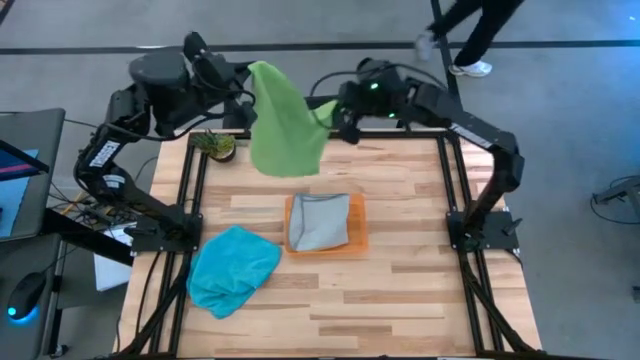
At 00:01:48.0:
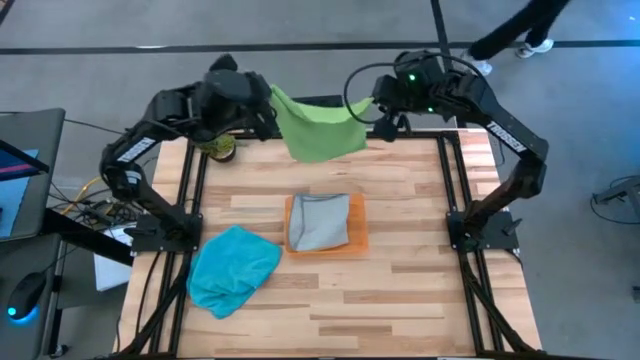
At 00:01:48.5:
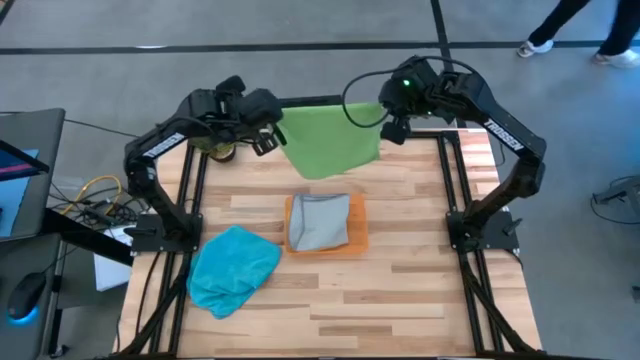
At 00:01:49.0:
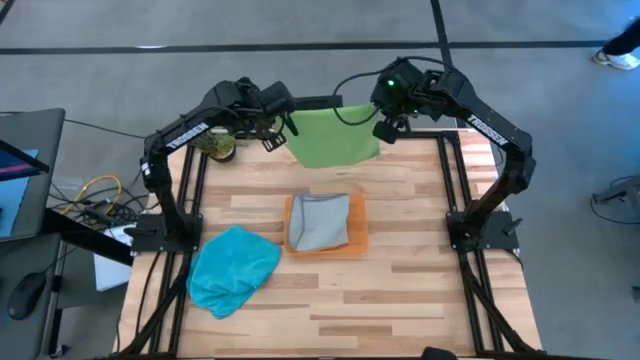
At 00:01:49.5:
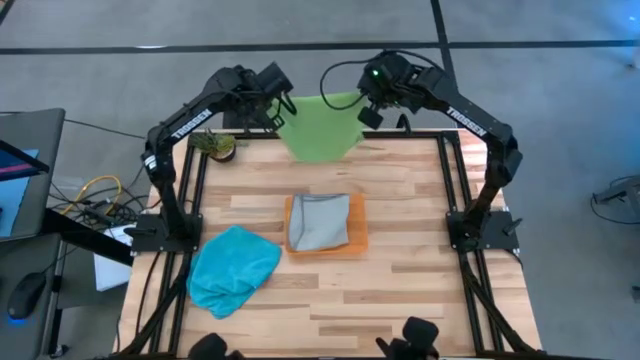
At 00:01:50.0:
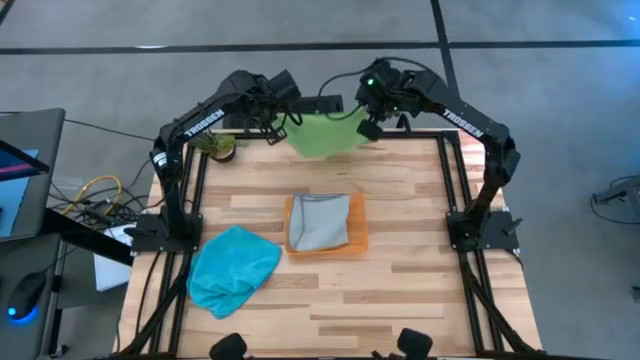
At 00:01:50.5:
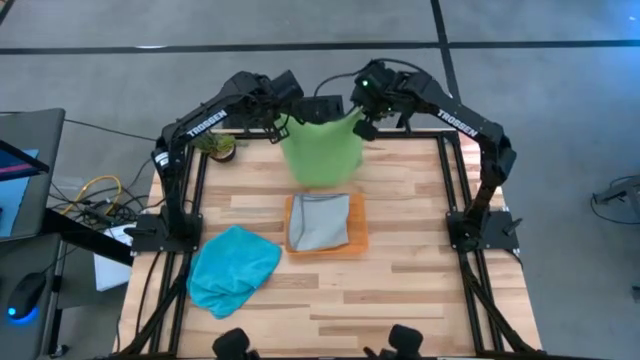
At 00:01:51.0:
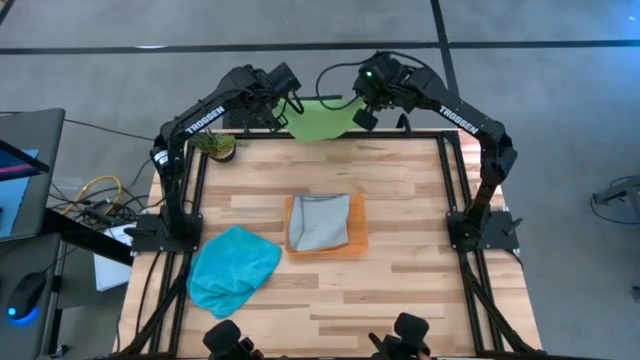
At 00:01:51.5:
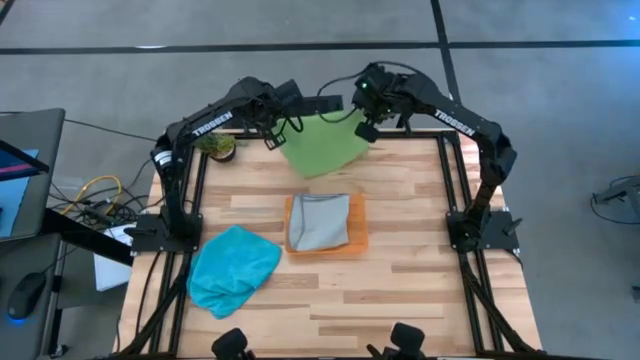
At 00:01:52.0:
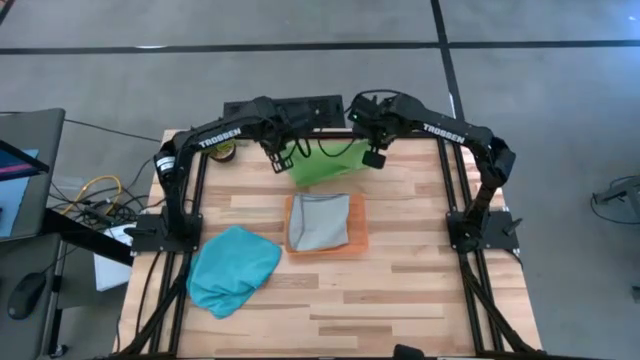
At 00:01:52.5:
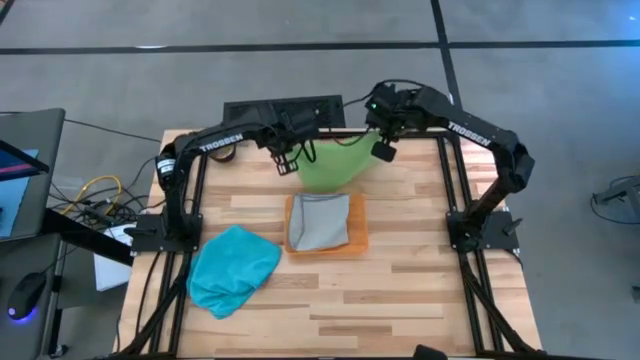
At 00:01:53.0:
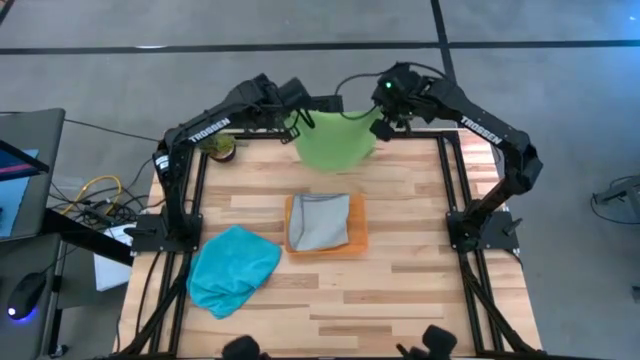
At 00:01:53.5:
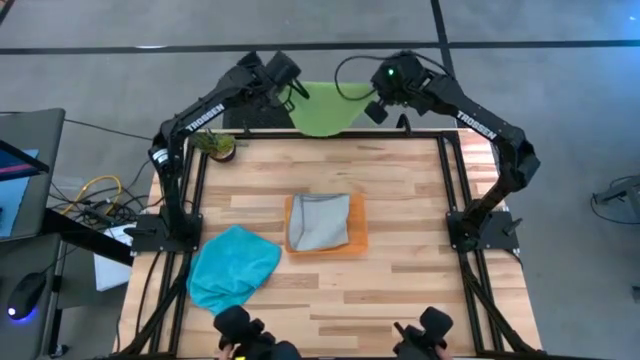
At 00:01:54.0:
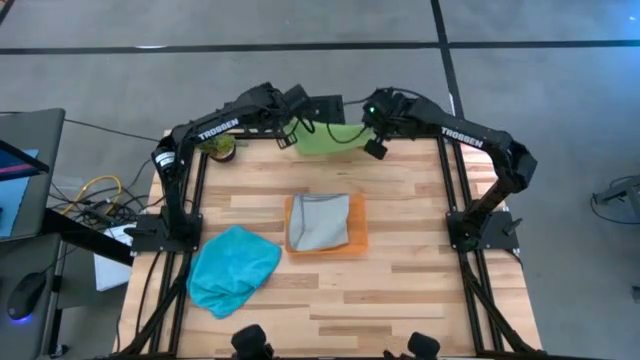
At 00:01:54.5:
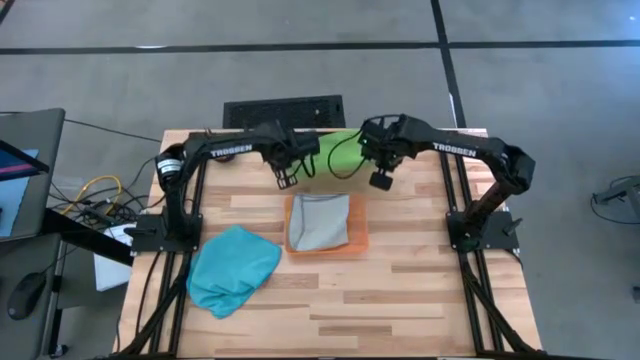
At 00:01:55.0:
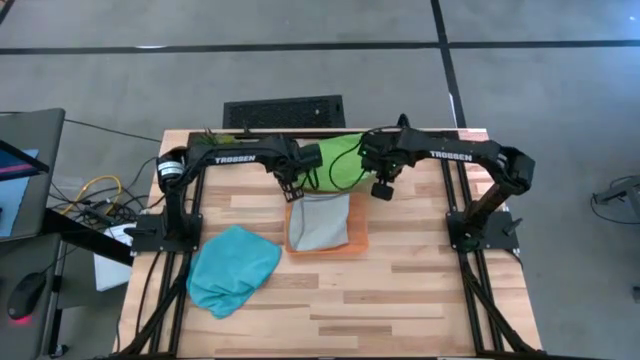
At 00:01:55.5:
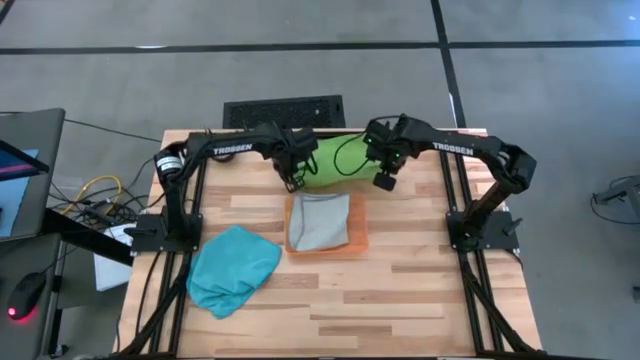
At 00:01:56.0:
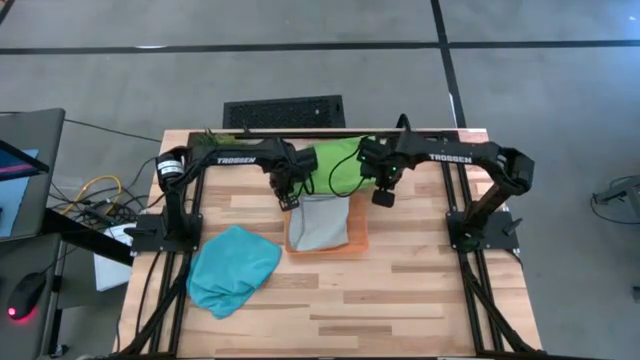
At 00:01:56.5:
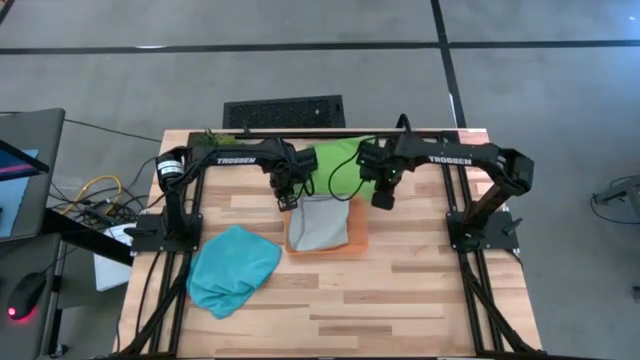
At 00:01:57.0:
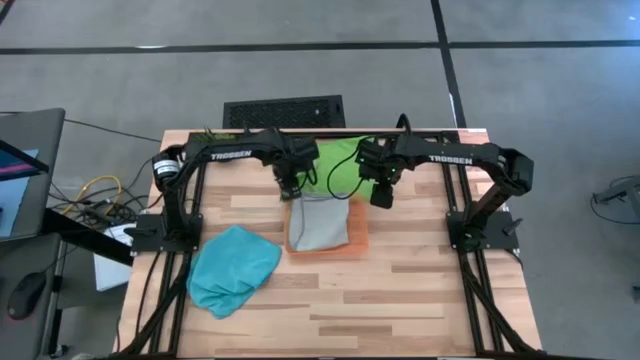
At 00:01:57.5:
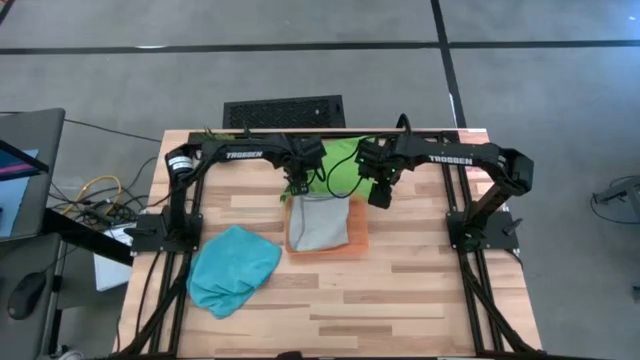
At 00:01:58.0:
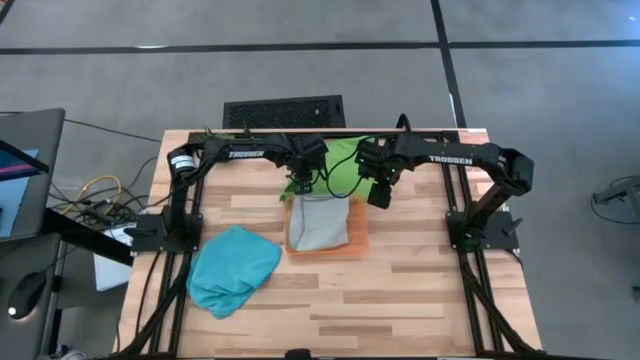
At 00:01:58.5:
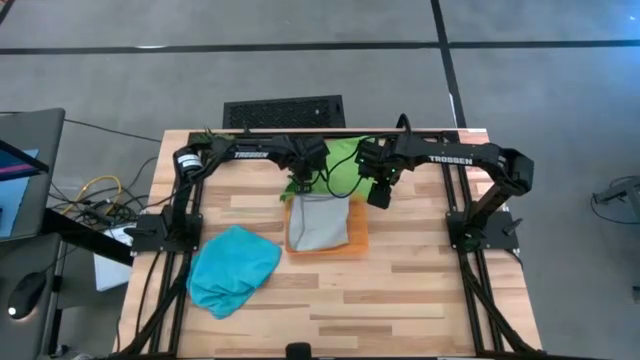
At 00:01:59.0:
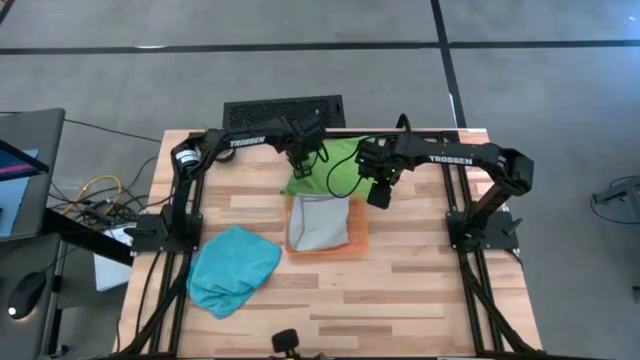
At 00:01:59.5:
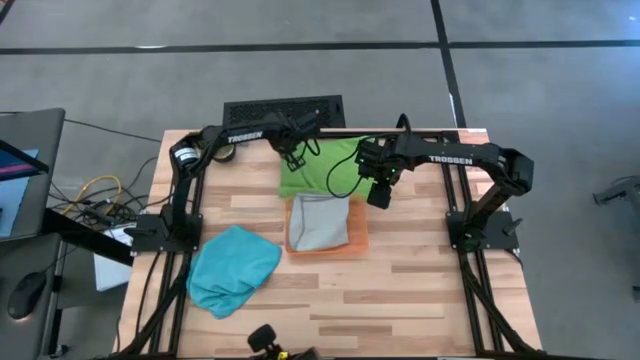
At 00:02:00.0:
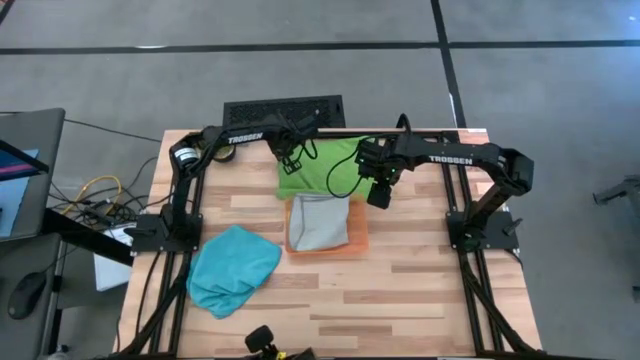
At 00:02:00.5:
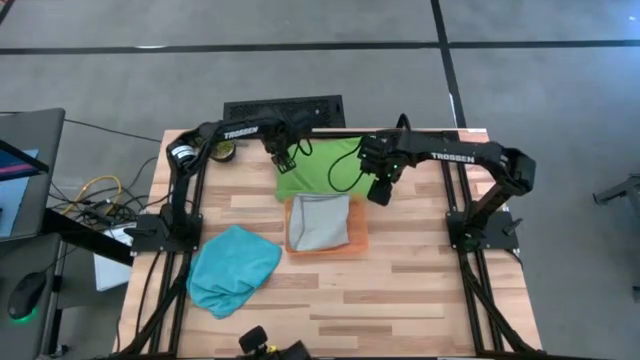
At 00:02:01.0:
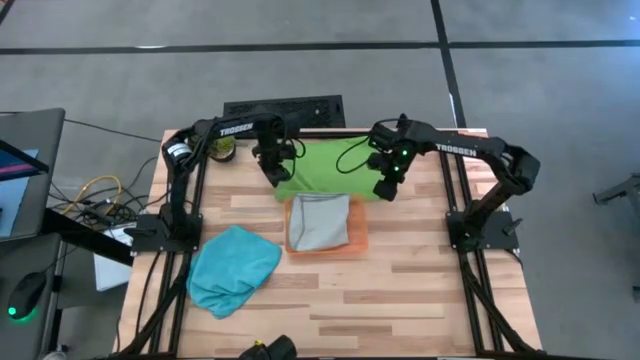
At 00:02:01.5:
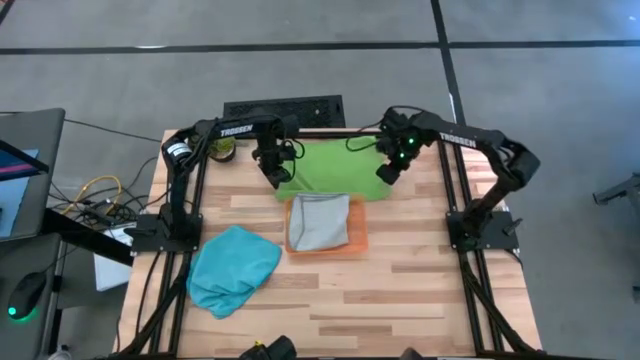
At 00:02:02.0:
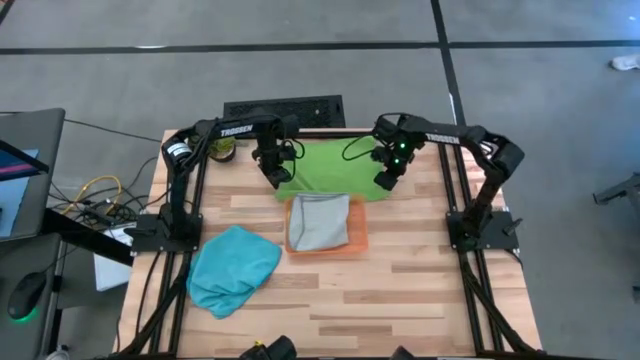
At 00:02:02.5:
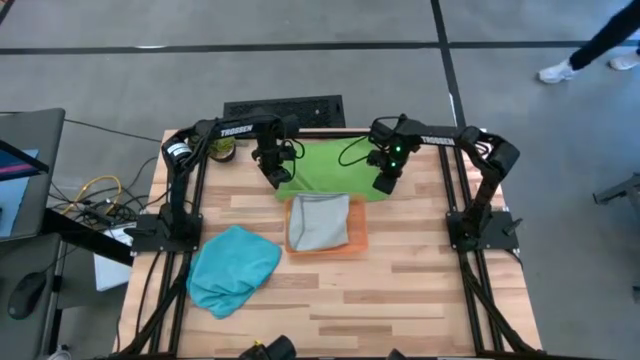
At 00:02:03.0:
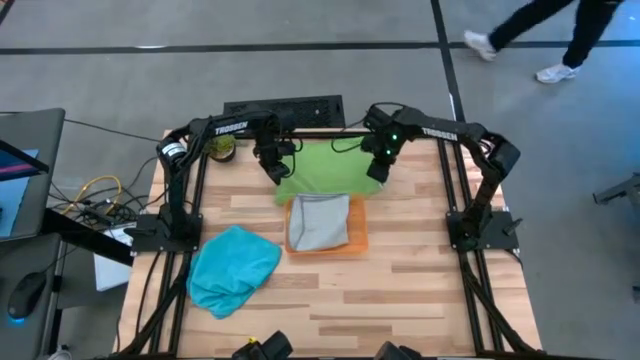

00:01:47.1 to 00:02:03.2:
Task: Sort microfiber towel by color & place in baskets
Fold the green towel

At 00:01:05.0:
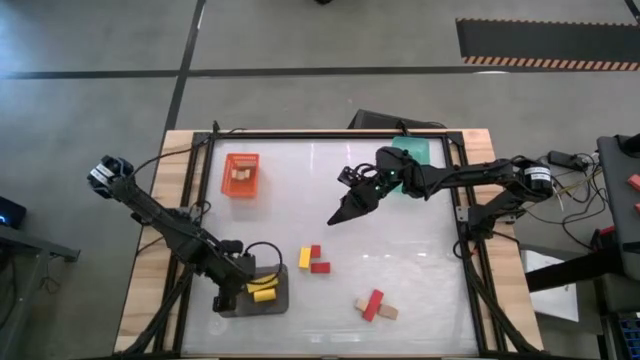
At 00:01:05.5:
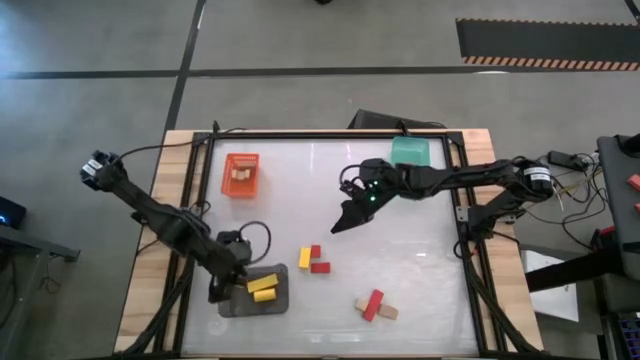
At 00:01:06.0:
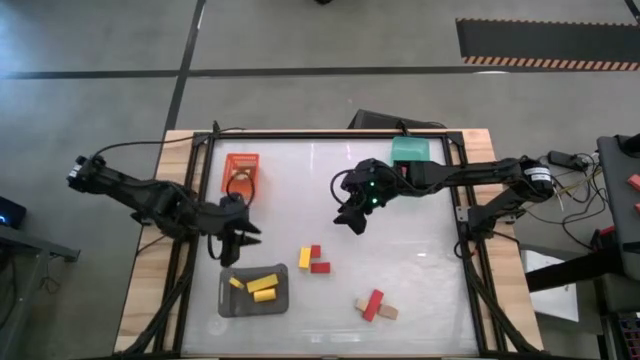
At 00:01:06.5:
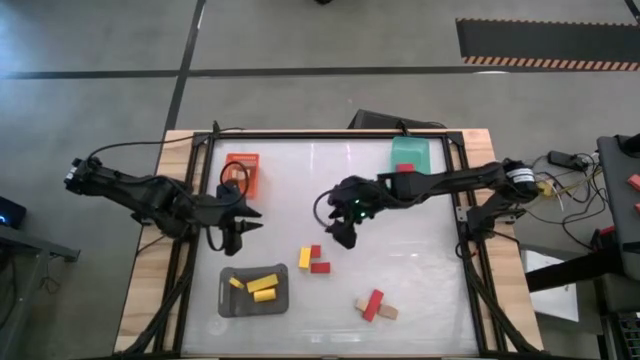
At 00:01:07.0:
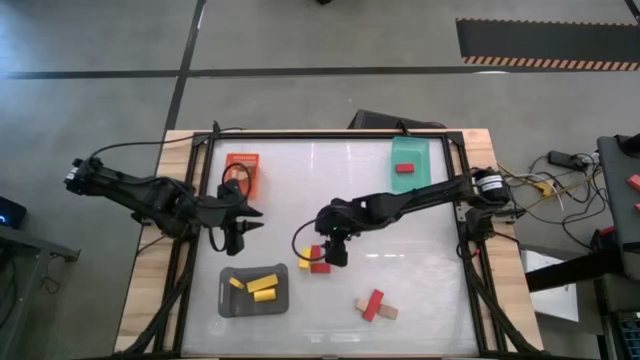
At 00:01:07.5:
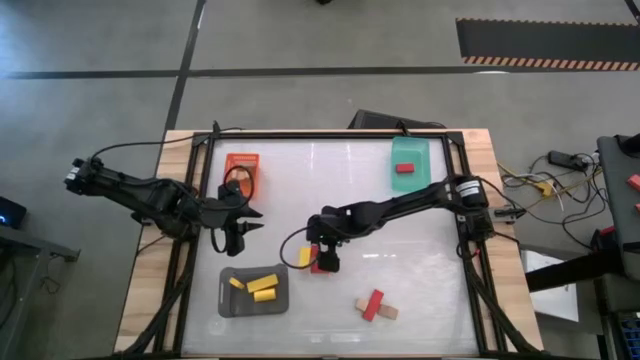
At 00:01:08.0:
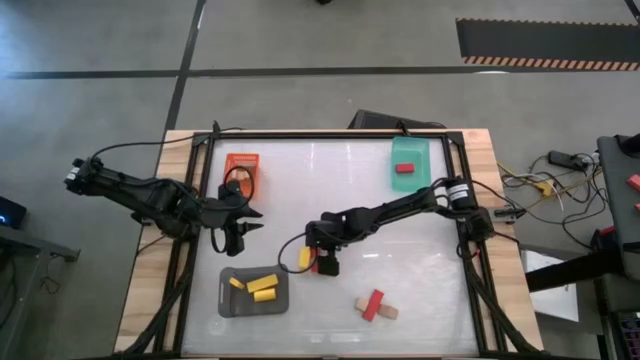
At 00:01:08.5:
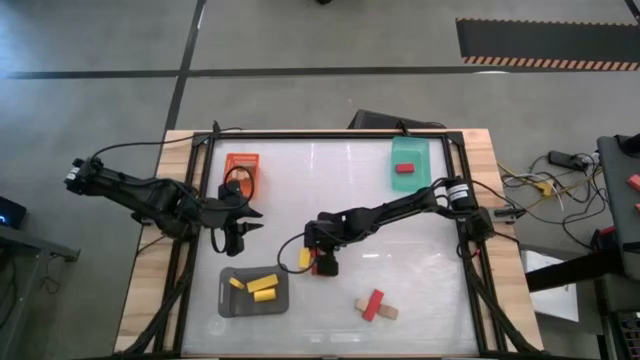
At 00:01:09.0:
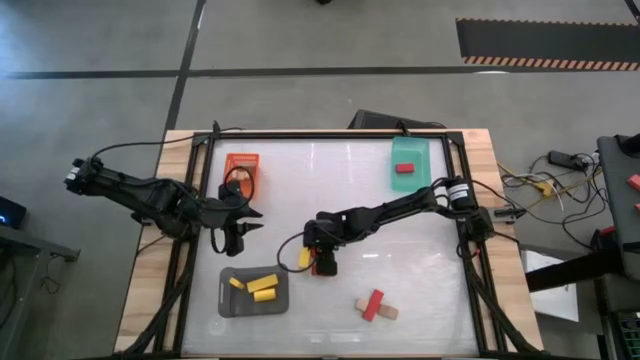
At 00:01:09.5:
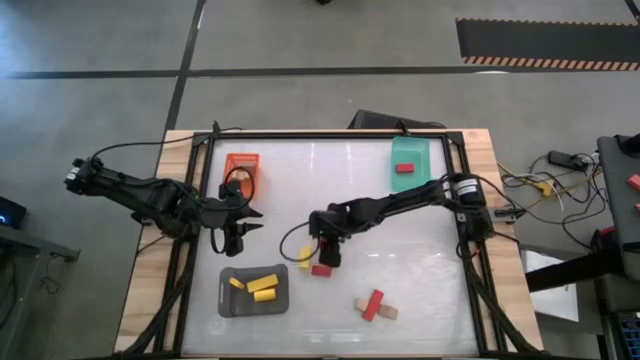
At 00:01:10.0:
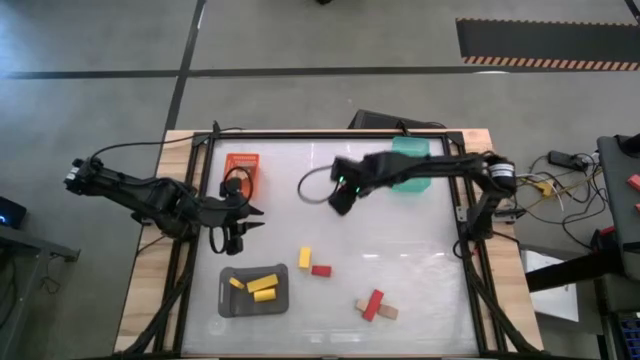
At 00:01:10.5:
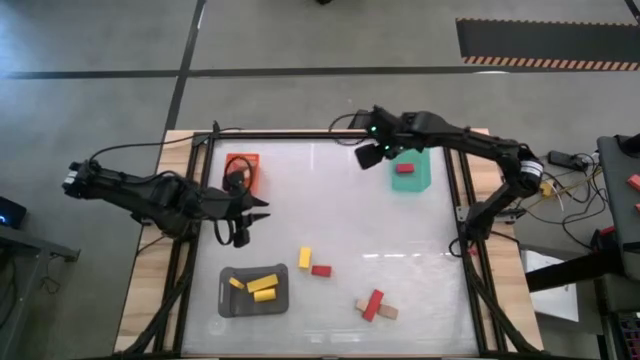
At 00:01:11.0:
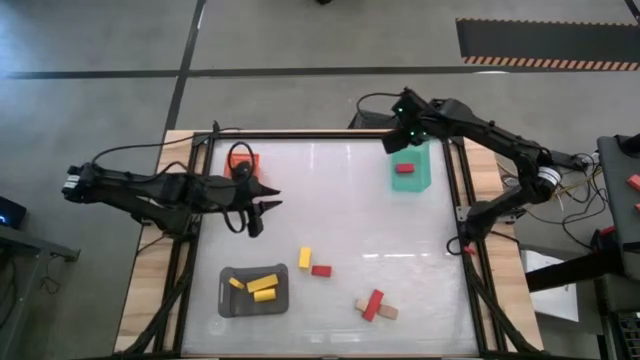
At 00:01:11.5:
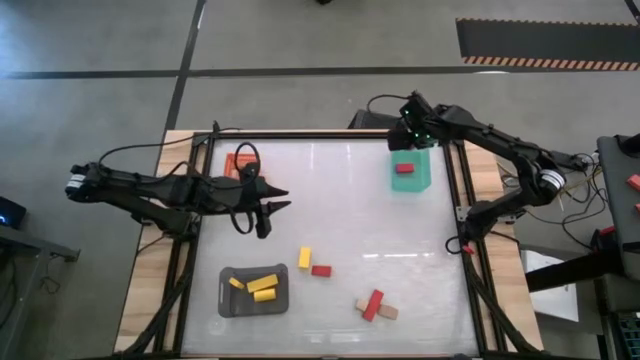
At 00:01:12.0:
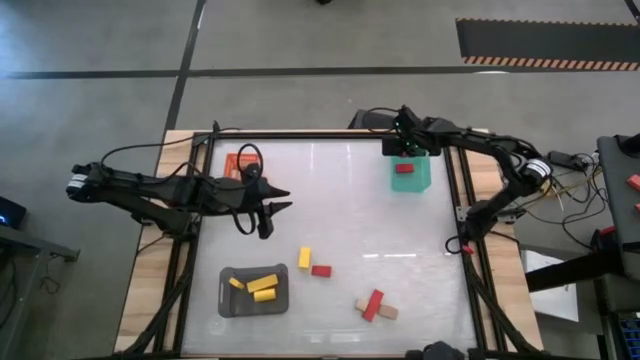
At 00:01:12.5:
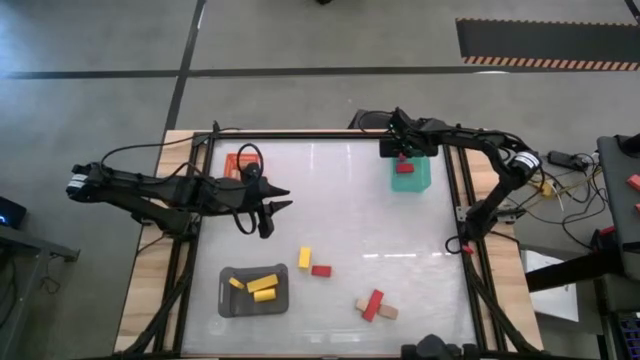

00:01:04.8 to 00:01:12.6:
Task: Sort & place blocks by color
Put the red block into the green bin
